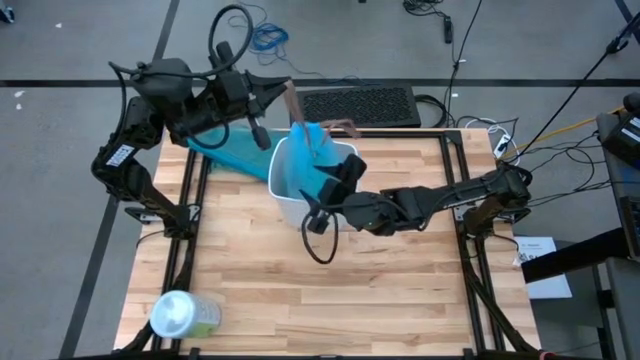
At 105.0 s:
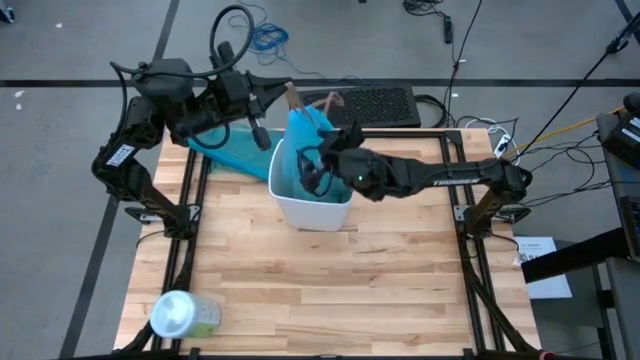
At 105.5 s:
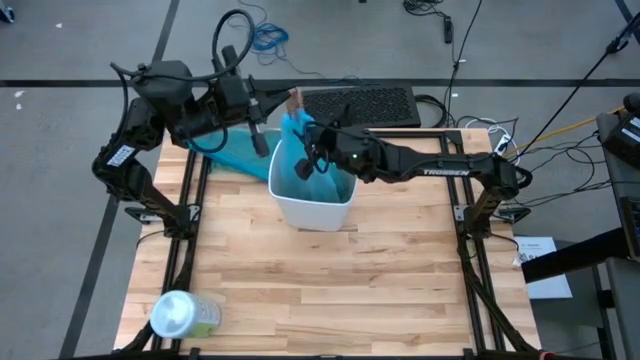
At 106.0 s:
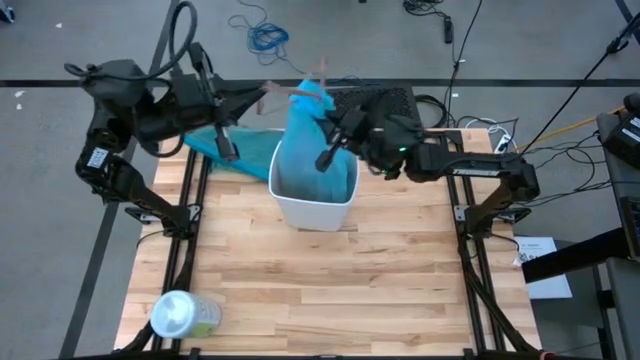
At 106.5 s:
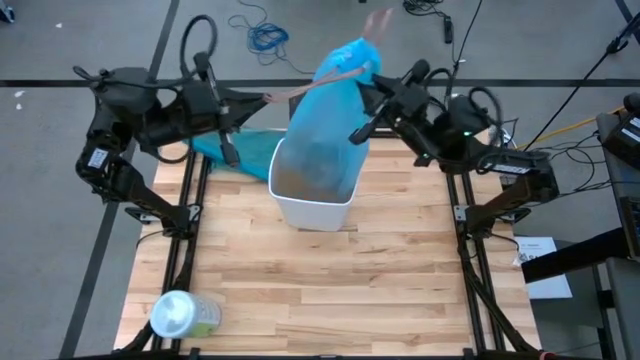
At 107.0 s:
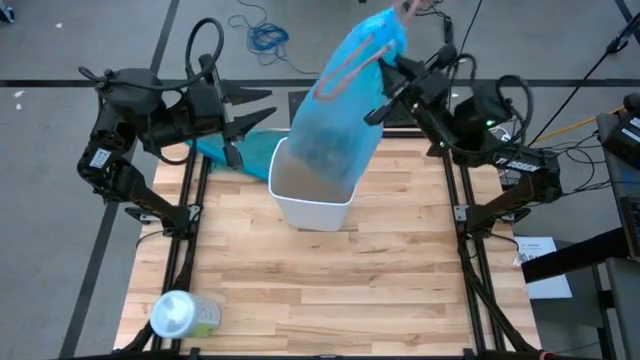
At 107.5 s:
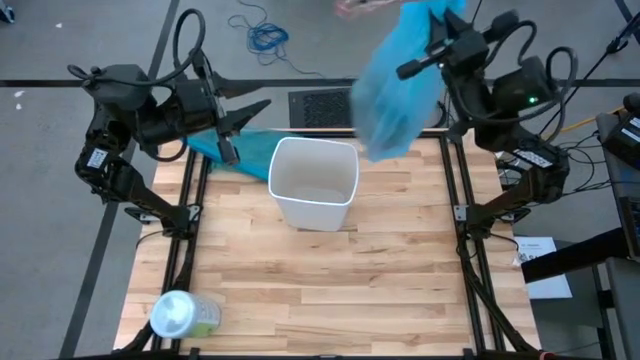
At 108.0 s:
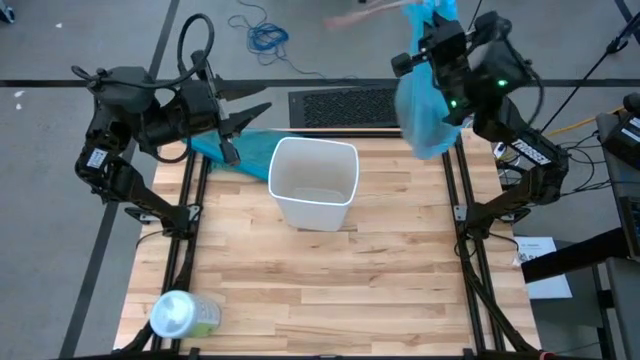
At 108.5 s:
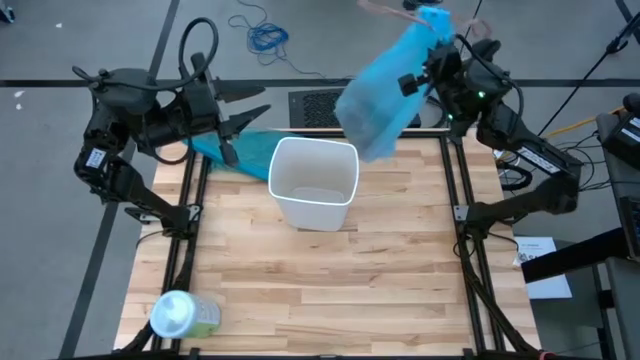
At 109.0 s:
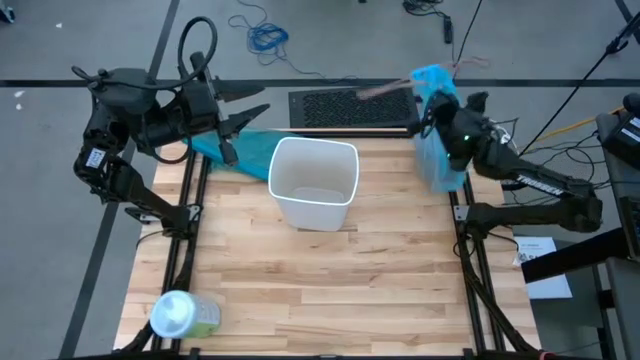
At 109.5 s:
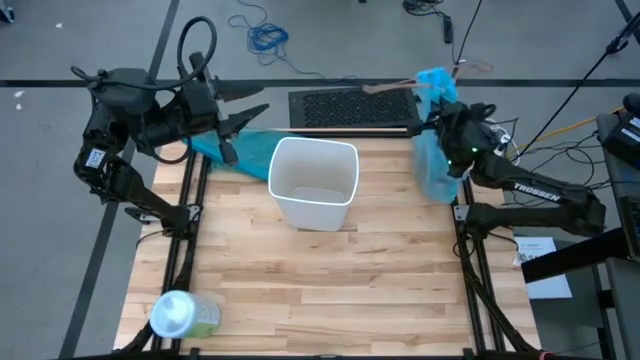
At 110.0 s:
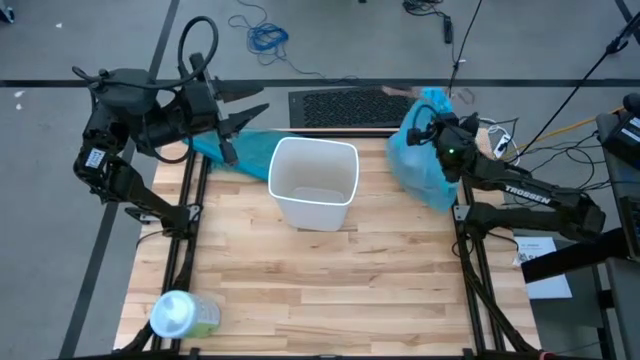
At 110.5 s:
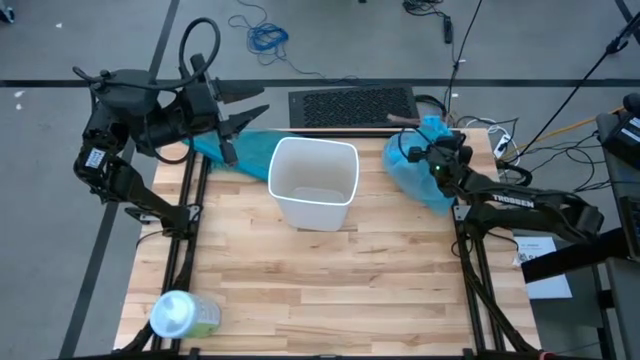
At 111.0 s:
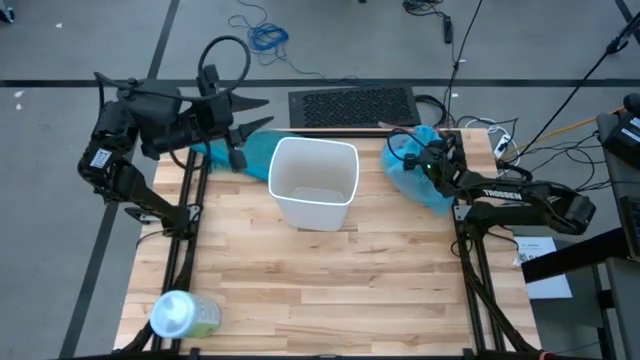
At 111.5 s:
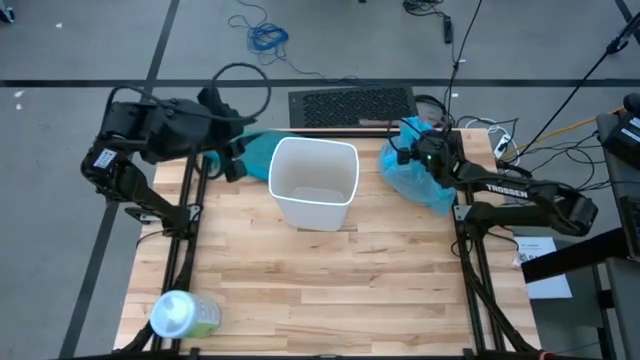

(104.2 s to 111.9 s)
Task: place trash/remove bag and relplace
Remove the light blue trash bag from the trash bin

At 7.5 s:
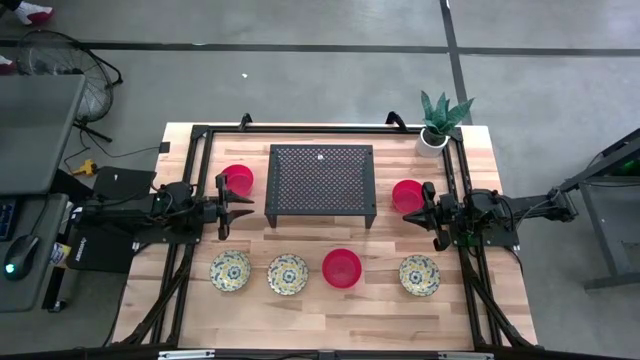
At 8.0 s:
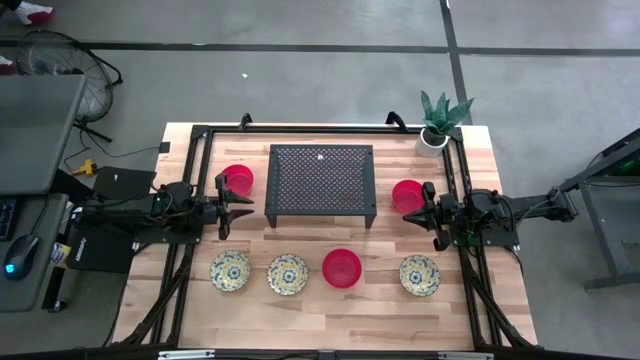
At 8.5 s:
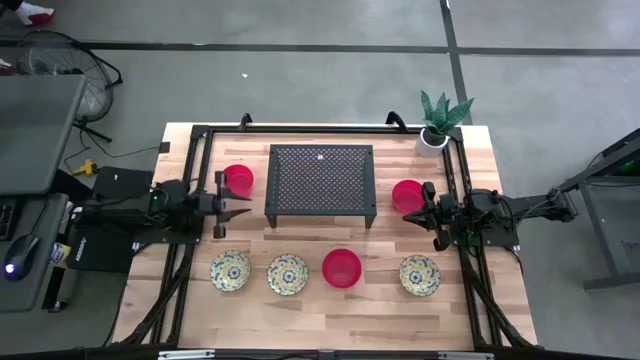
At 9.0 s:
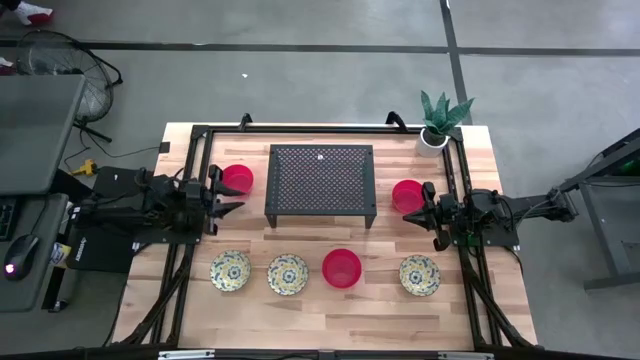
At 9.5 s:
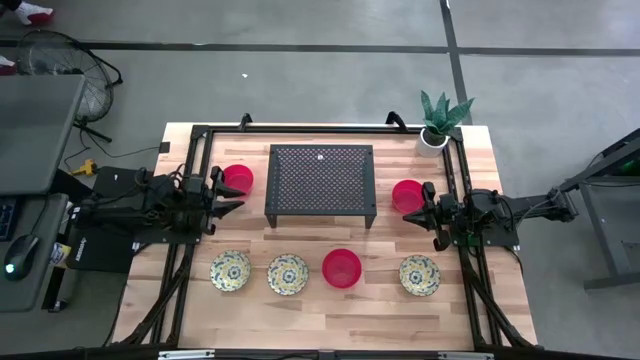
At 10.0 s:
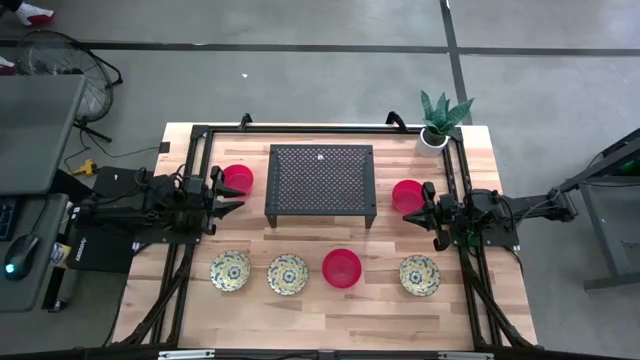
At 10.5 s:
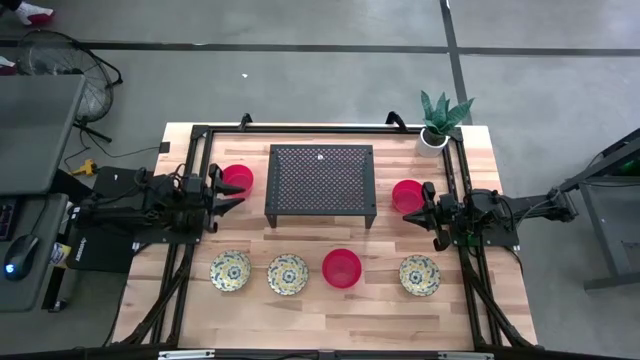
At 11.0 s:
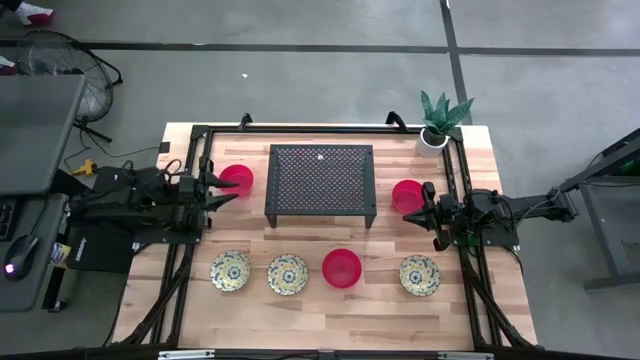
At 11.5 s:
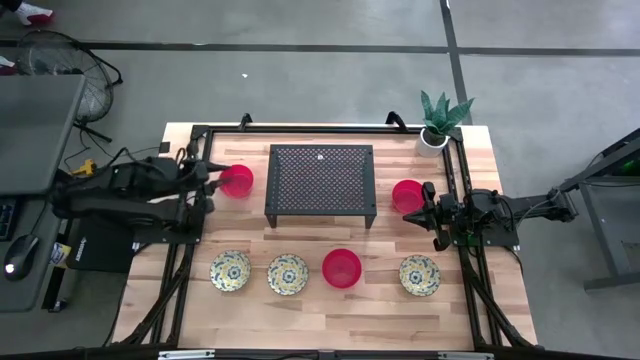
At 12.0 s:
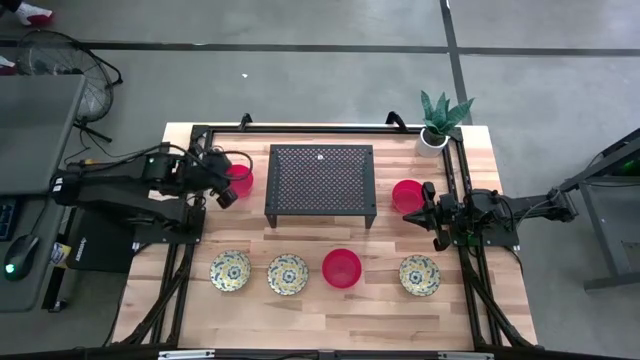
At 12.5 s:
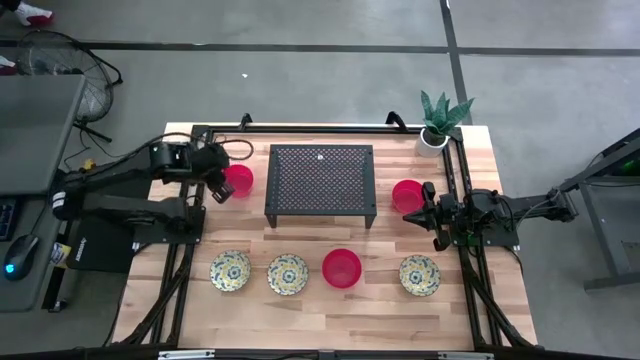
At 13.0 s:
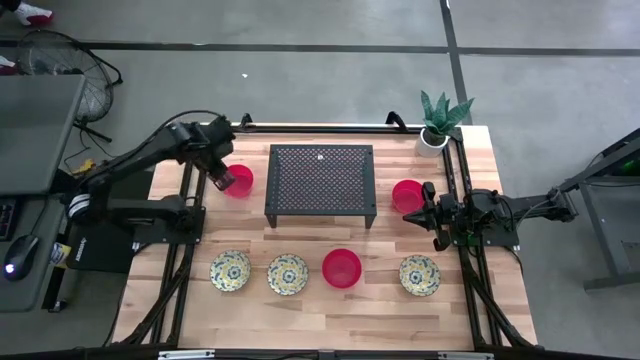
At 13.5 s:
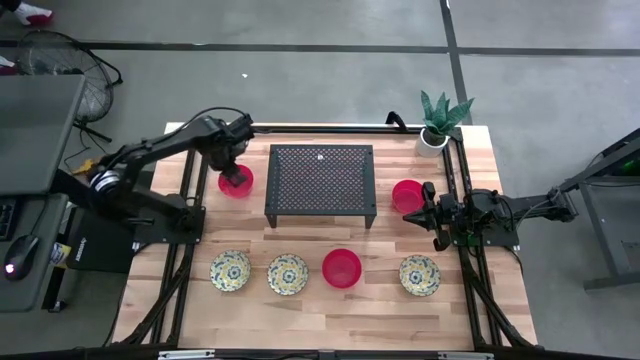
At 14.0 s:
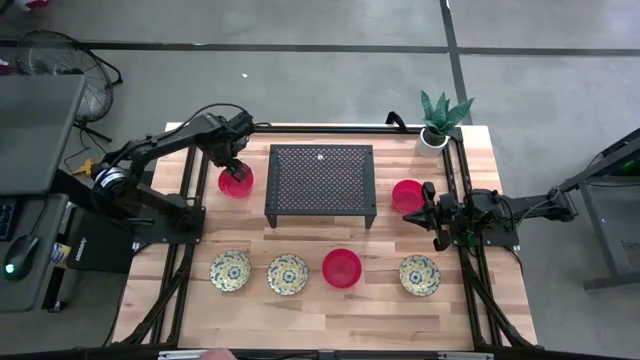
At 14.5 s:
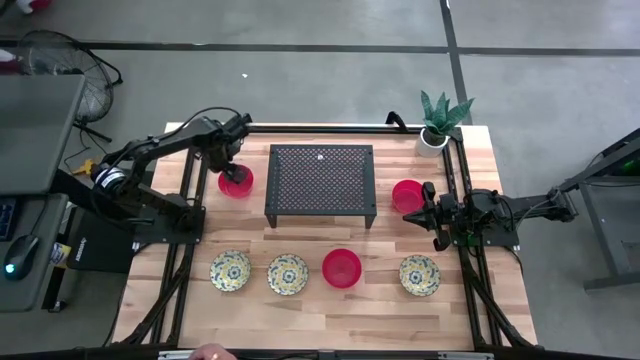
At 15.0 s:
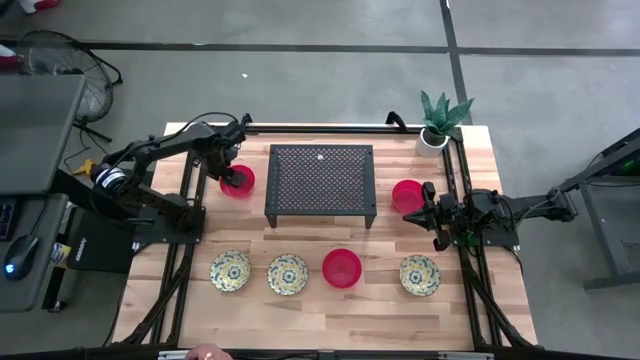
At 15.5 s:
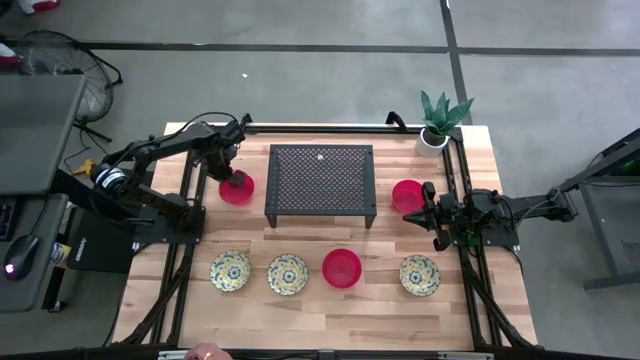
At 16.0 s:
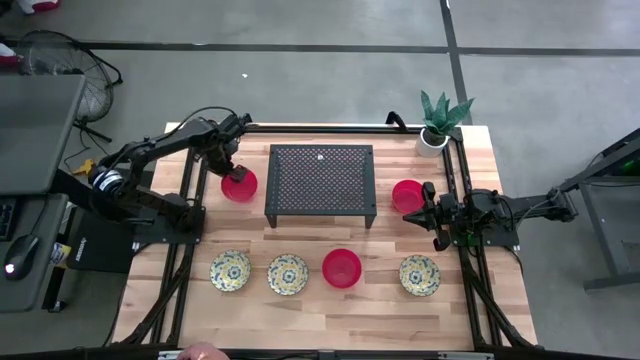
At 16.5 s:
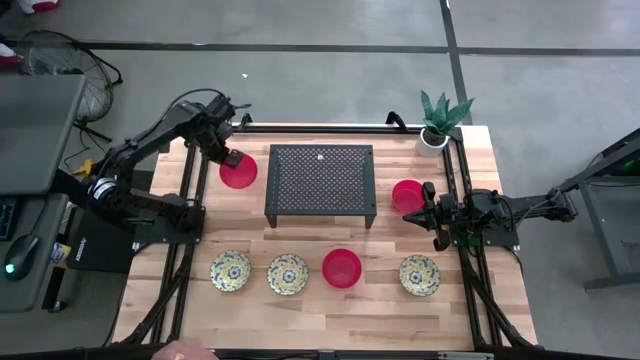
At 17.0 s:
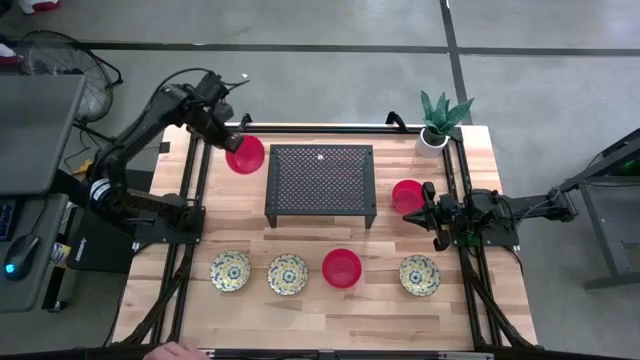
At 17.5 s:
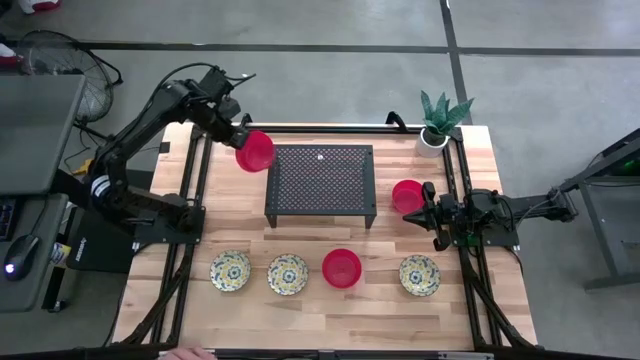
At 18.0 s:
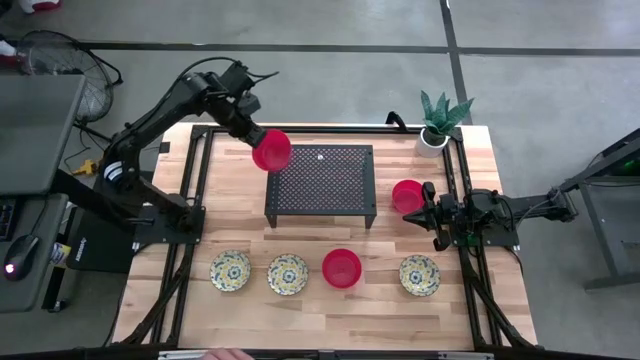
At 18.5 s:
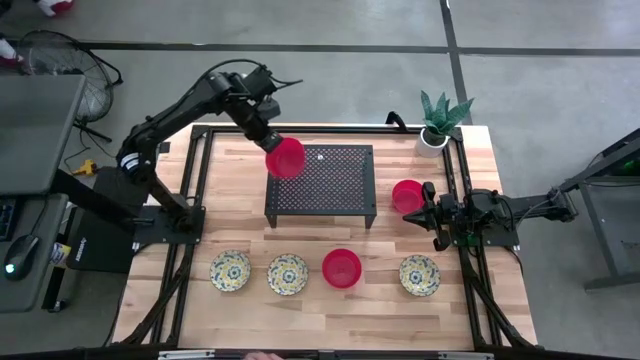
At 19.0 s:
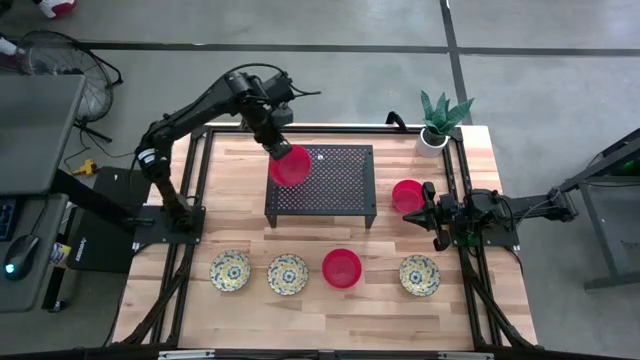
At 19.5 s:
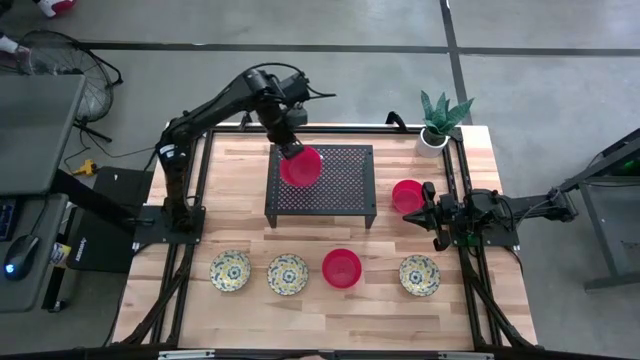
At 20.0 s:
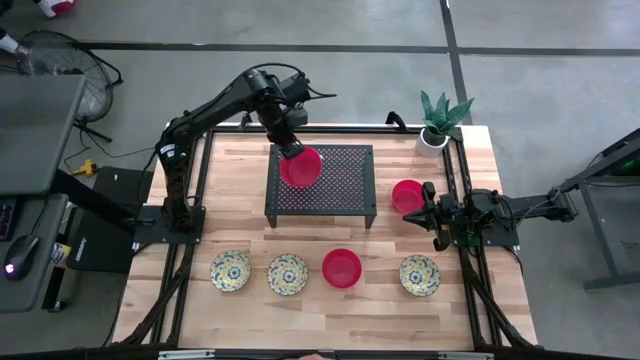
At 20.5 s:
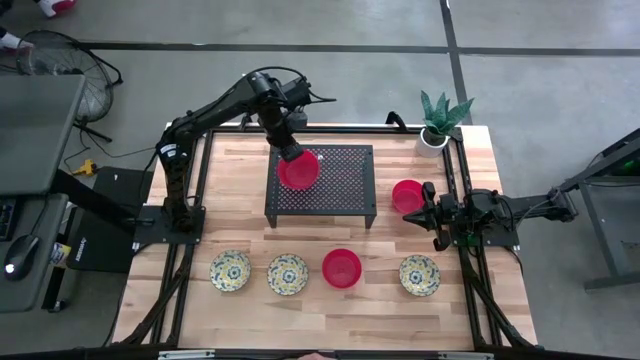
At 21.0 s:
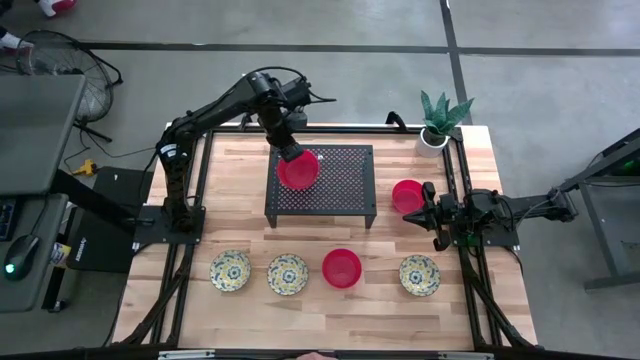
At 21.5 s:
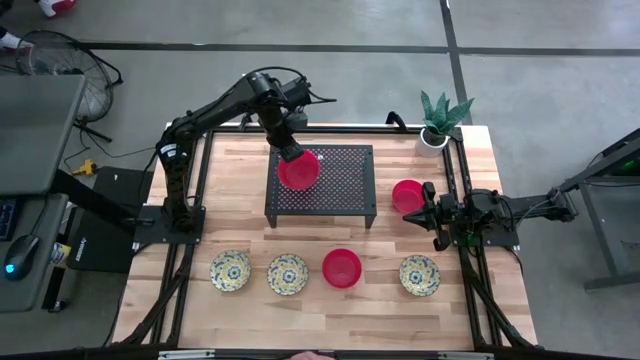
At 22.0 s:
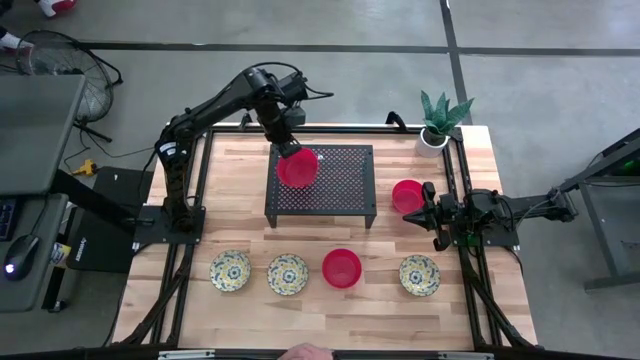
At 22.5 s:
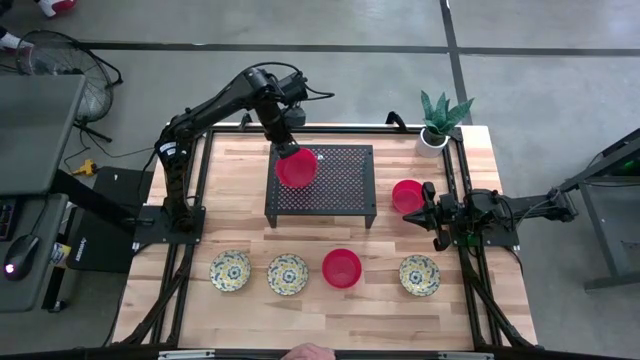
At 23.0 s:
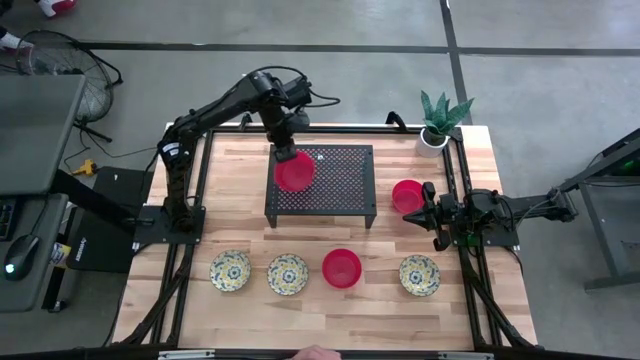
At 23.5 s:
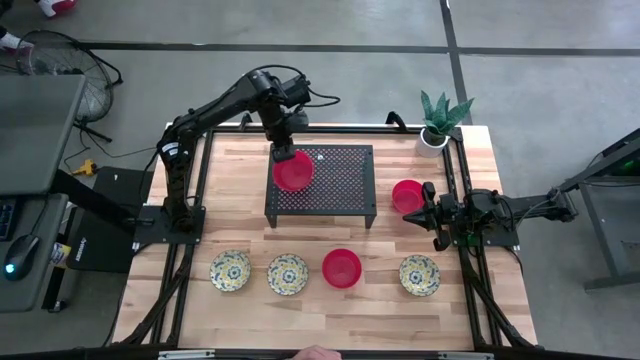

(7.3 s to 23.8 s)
Task: Pick & Place Mini bowls
Put the top left red bowl on the shelf
